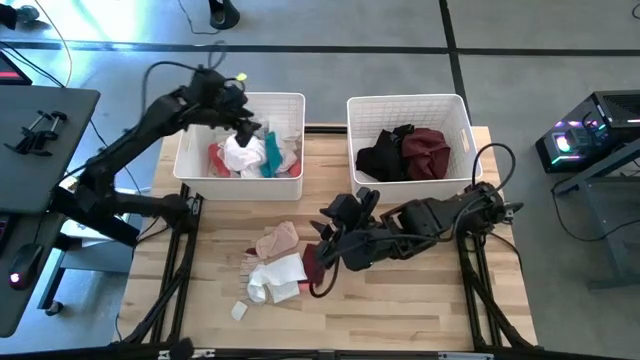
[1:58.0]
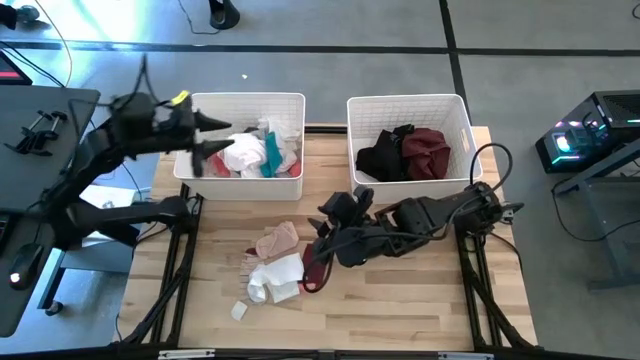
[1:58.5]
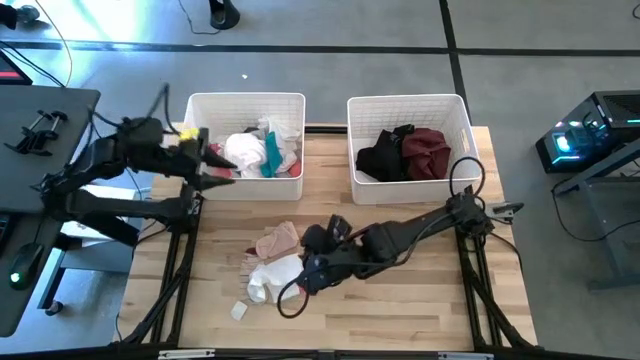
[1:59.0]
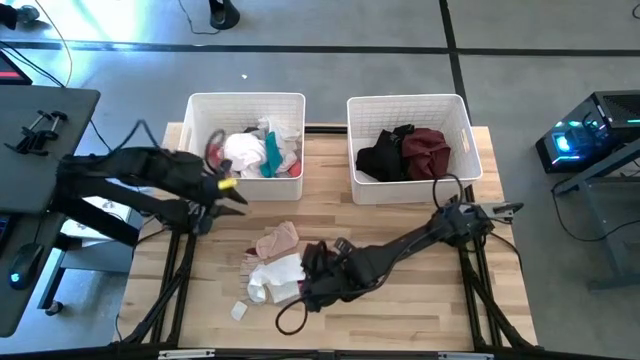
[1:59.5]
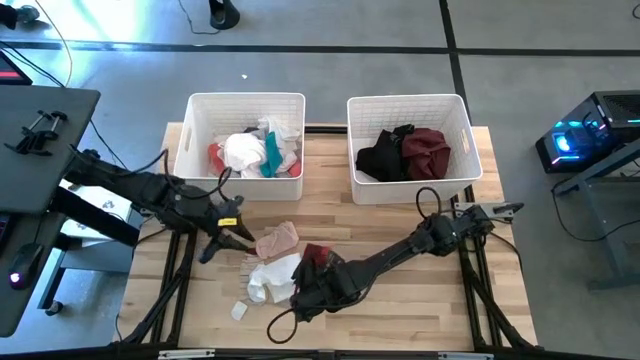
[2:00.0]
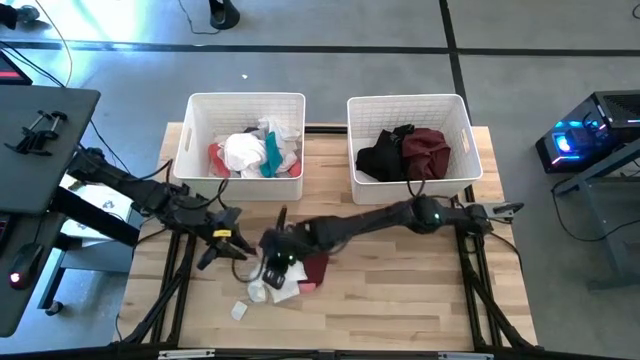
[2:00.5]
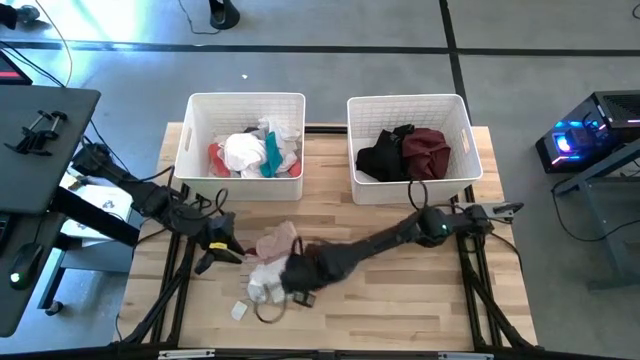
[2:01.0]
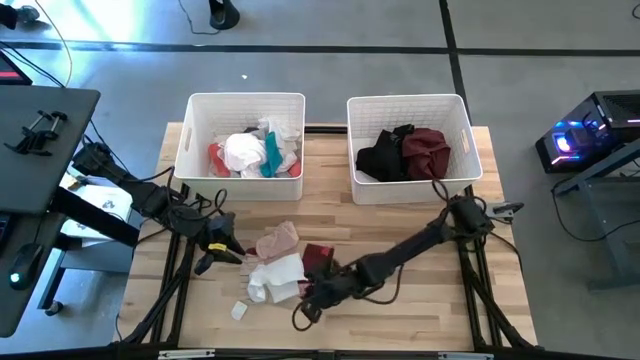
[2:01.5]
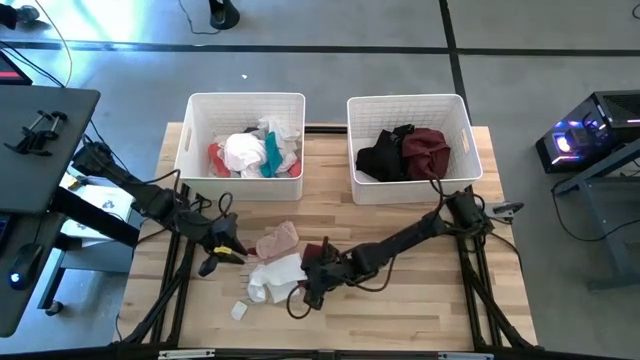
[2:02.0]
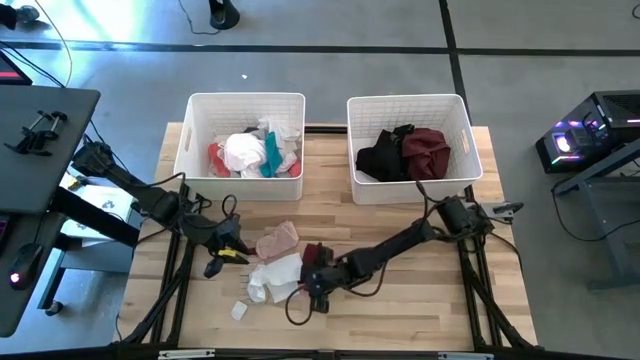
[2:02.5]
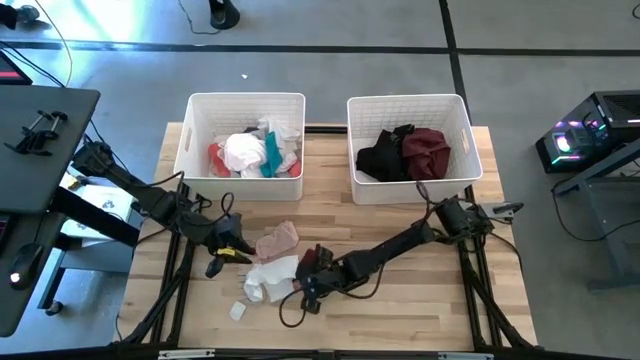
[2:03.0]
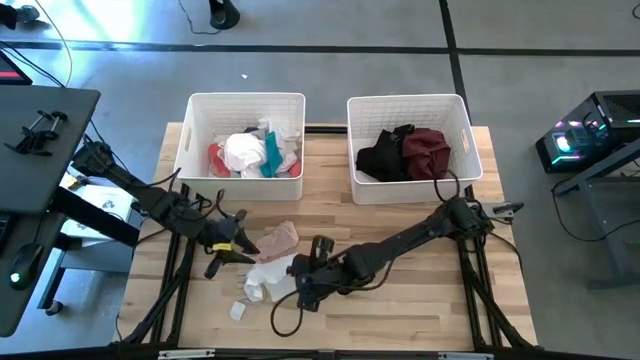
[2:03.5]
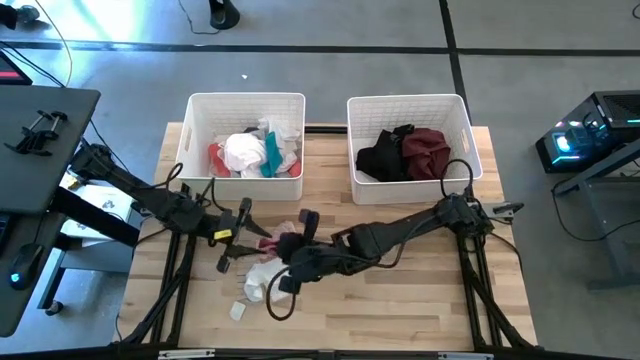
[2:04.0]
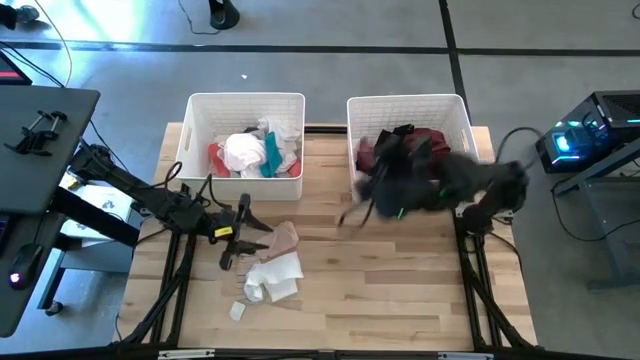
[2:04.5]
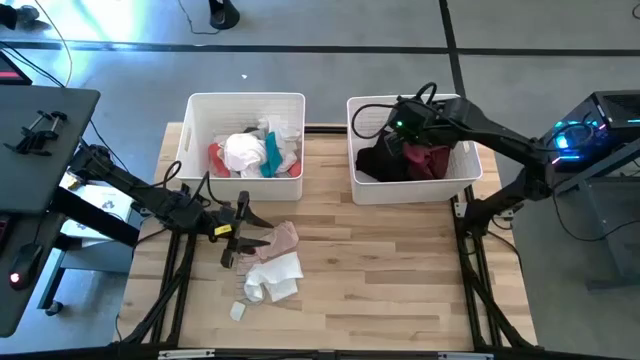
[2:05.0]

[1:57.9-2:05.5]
Task: Sort clothes
Put the dark red sock into the right white laundry bin

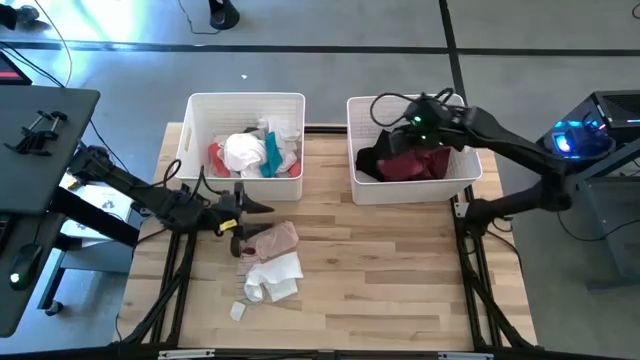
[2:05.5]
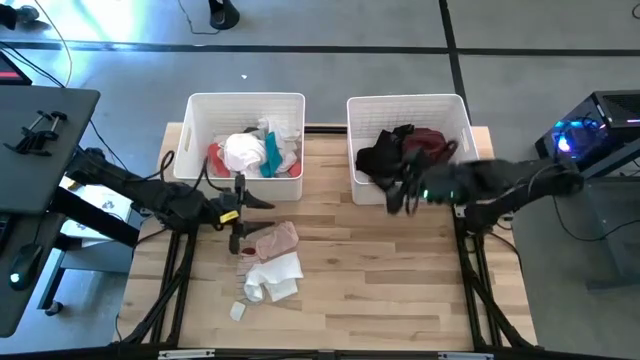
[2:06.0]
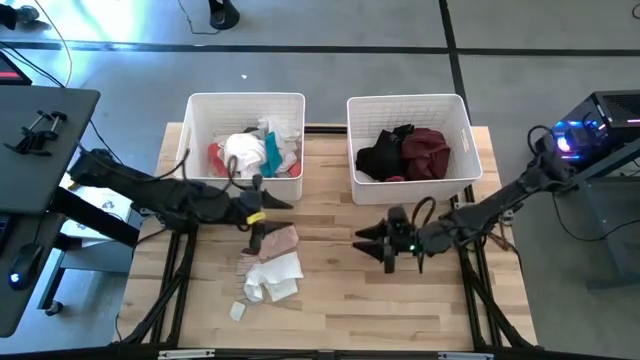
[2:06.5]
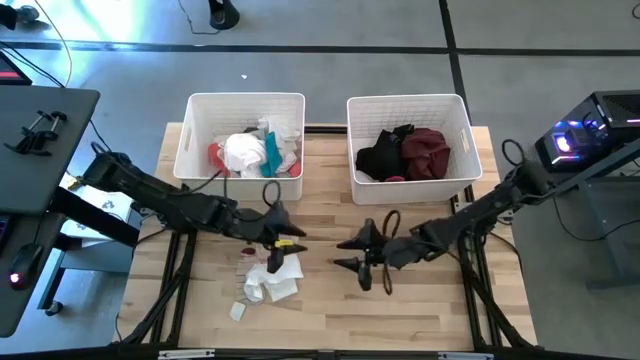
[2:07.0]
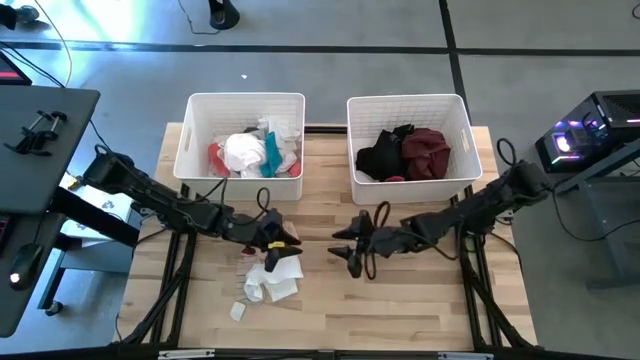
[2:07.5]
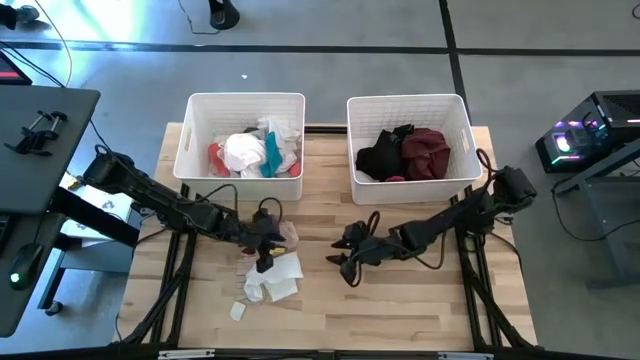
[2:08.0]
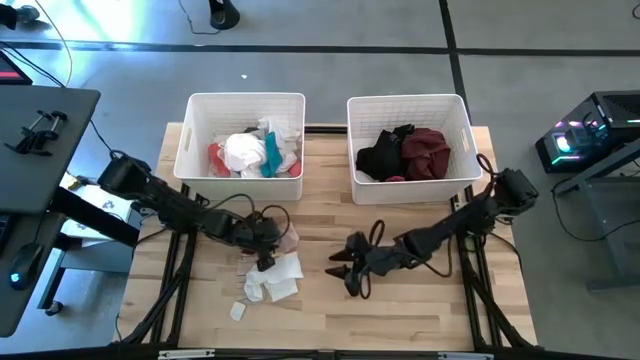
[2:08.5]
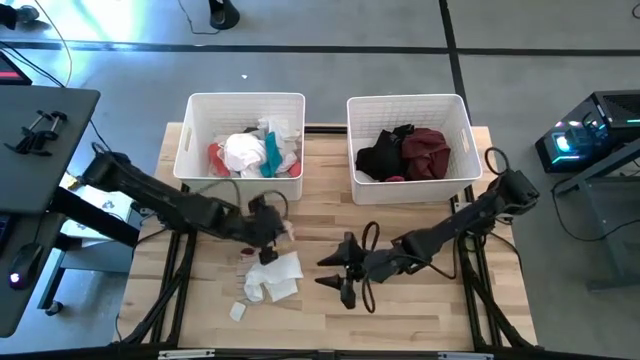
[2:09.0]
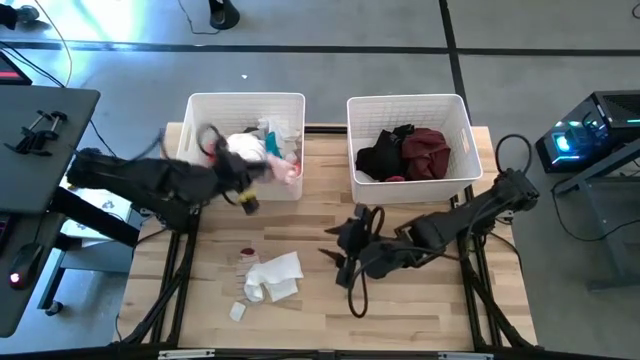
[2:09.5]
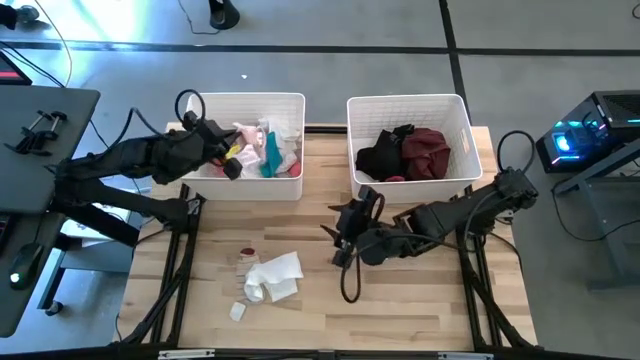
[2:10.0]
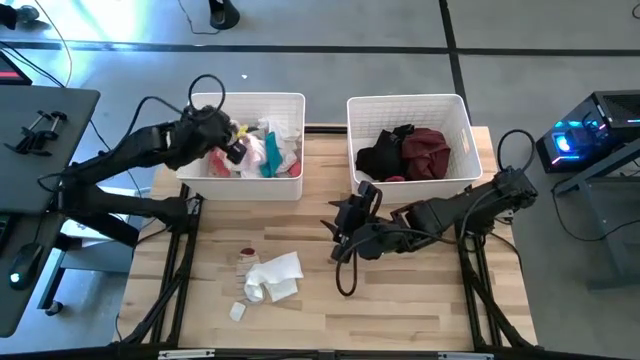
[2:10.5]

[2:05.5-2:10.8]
Put the light pink sock into the left white laundry bin

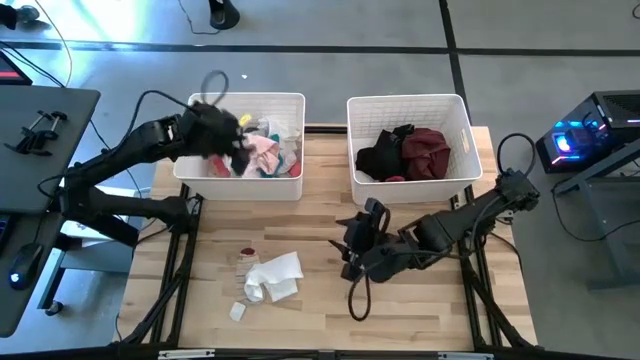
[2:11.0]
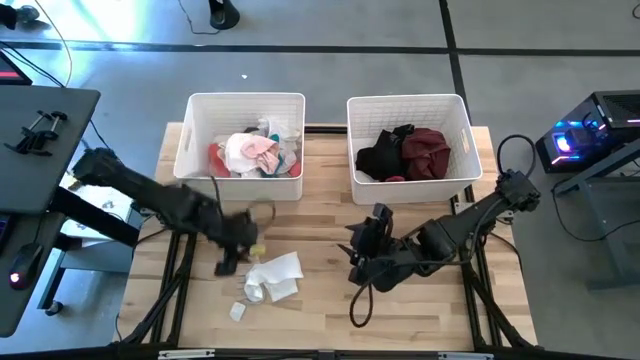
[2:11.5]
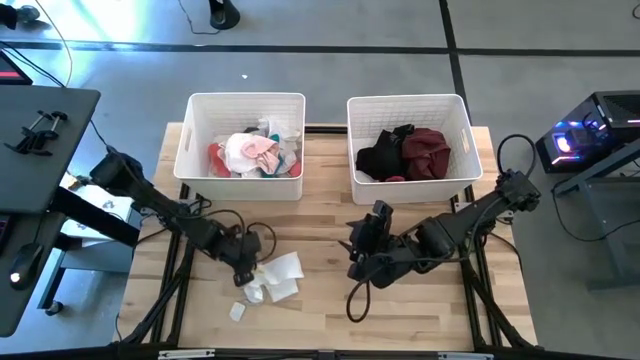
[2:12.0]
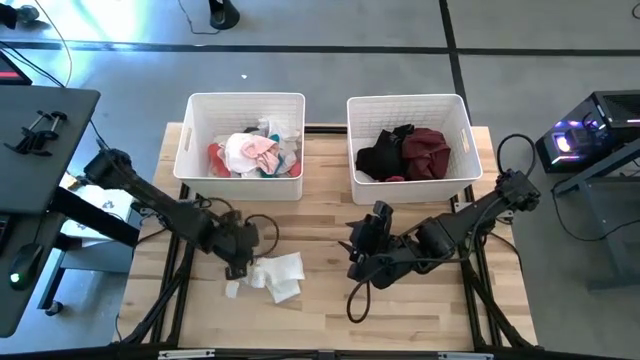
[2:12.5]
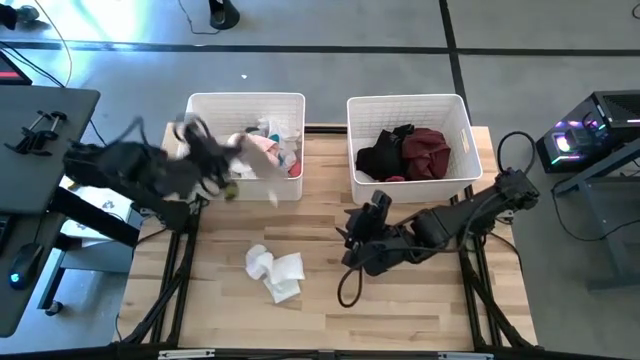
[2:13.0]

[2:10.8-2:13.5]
Put the white red striped sock into the left white laundry bin

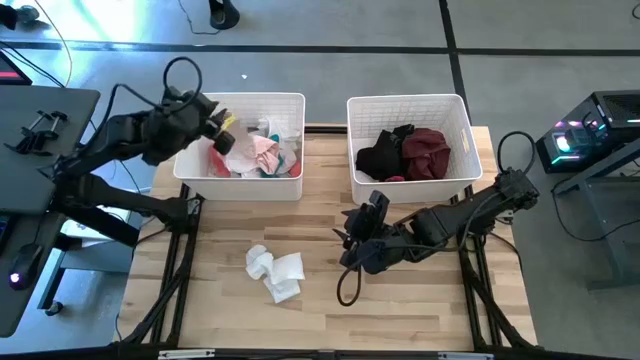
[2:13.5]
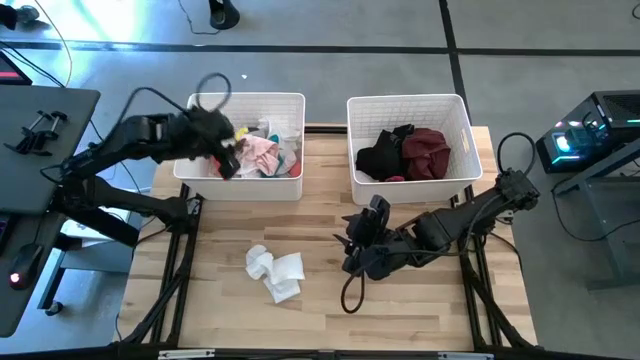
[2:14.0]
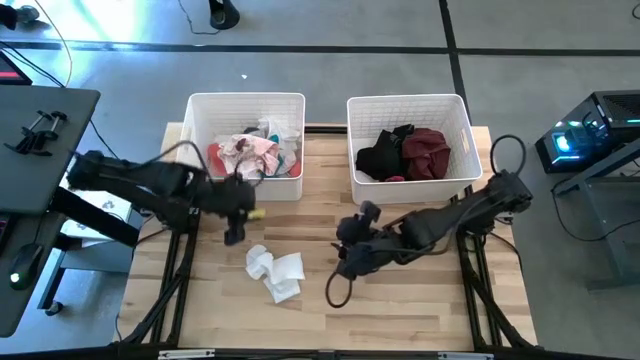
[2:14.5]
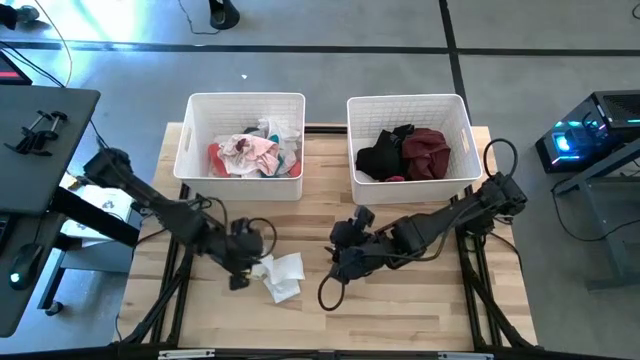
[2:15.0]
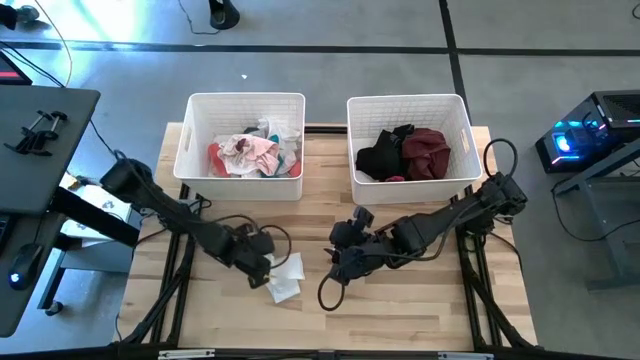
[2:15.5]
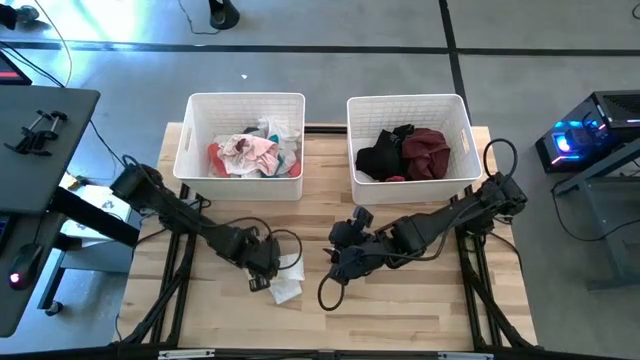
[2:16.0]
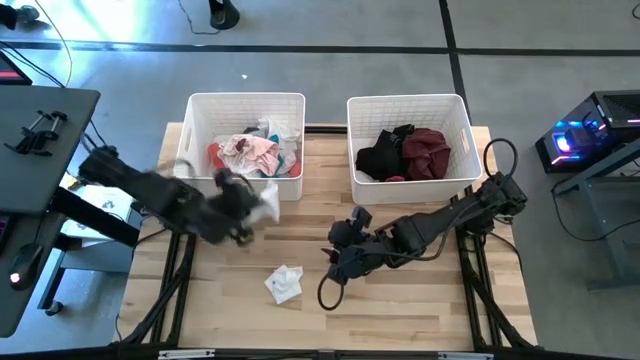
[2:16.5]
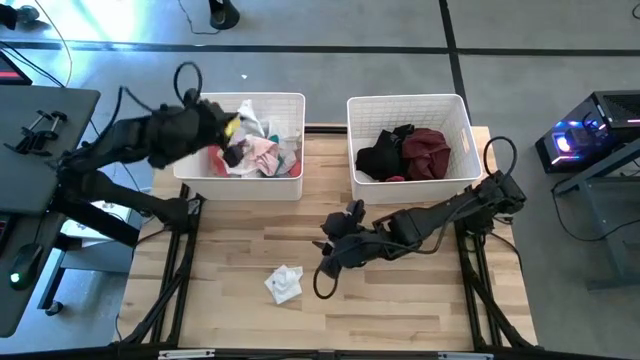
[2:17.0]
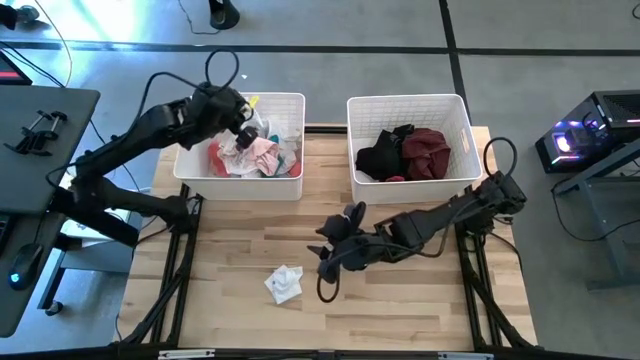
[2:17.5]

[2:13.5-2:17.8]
Put the white sock into the left white laundry bin

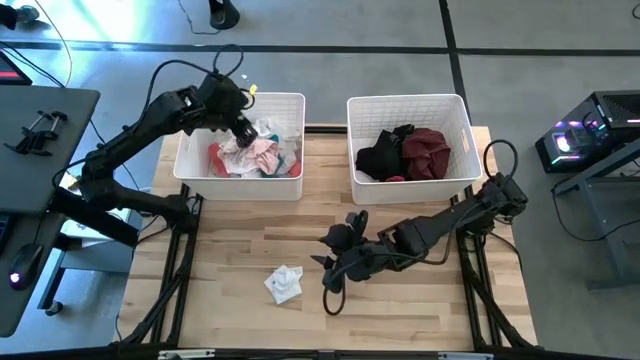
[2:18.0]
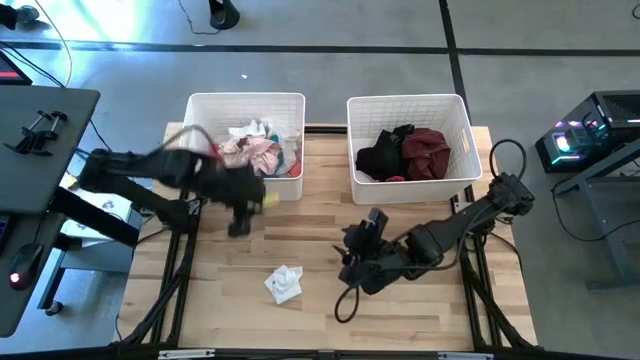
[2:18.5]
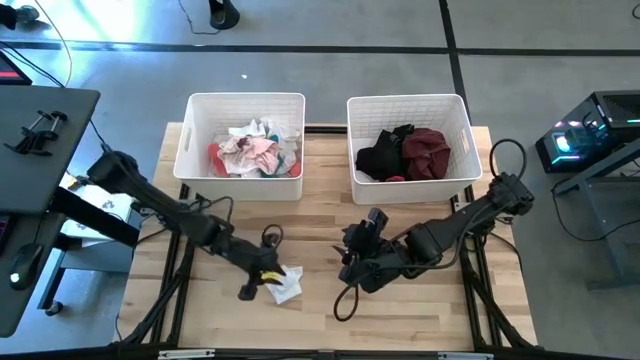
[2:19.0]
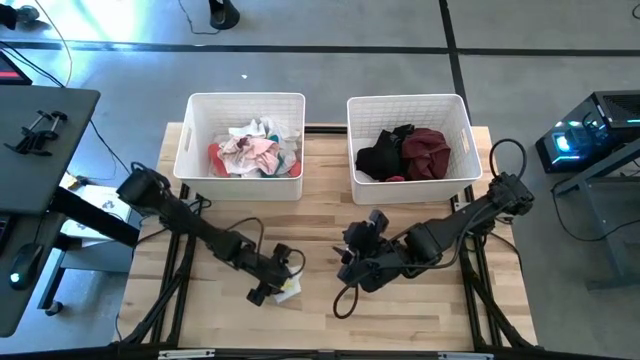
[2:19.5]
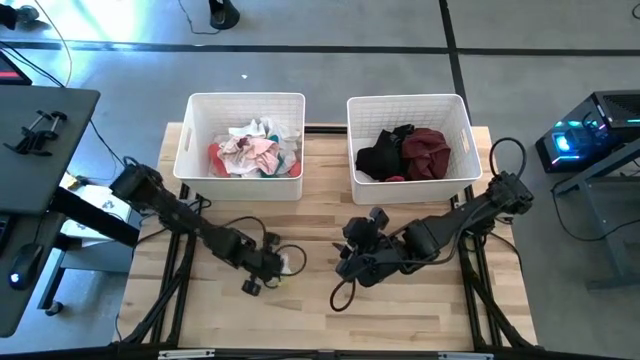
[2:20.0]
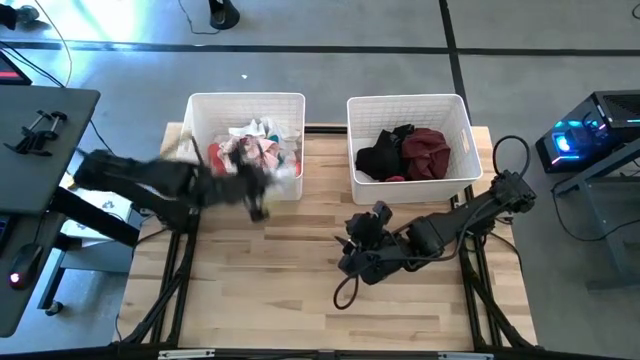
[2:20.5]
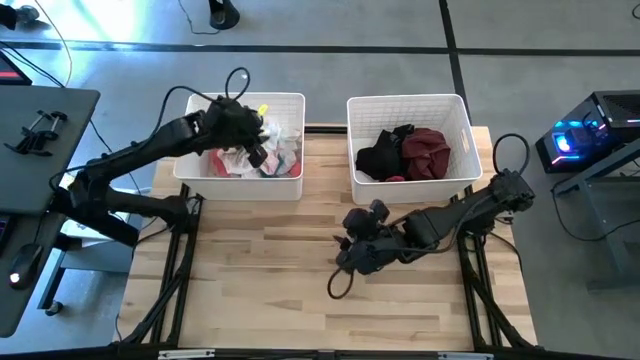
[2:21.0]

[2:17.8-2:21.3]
Put the white sock into the left white laundry bin
